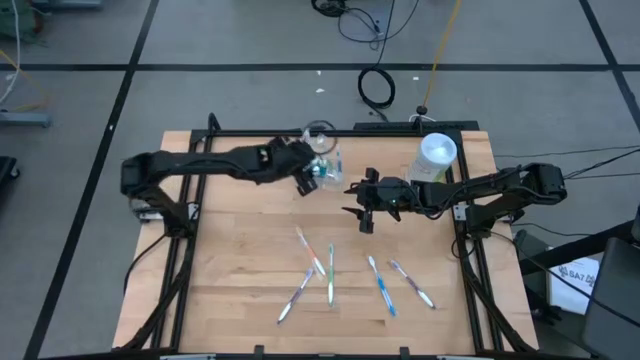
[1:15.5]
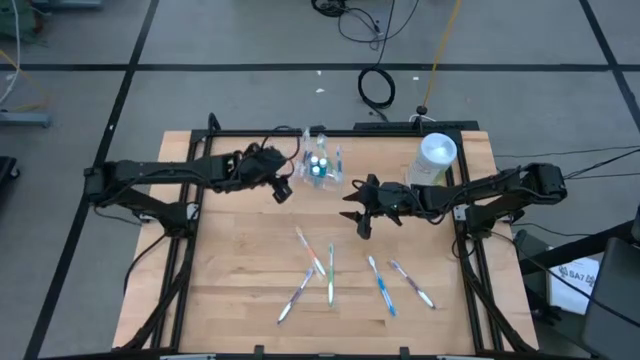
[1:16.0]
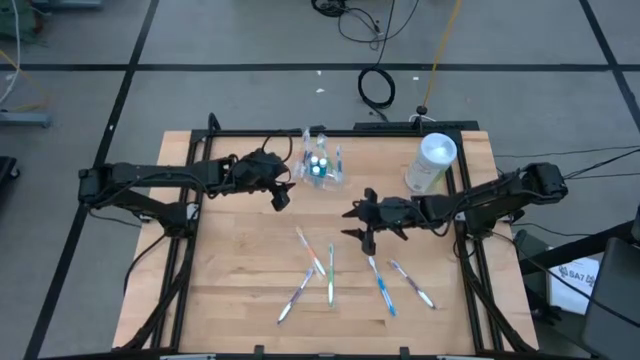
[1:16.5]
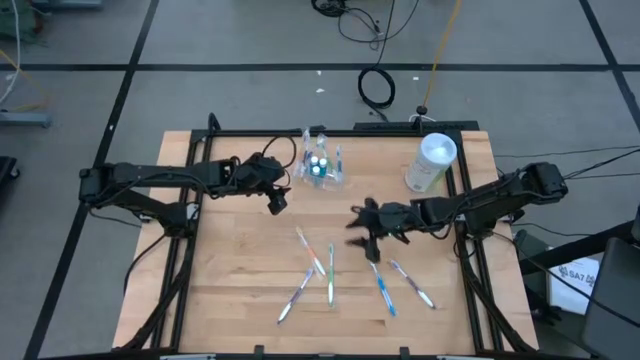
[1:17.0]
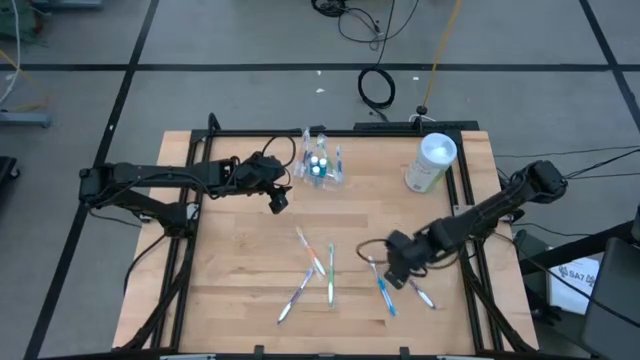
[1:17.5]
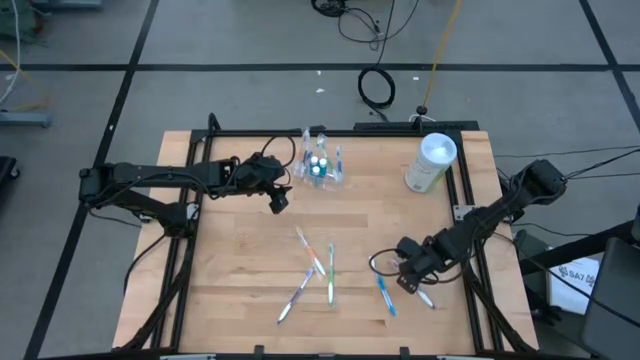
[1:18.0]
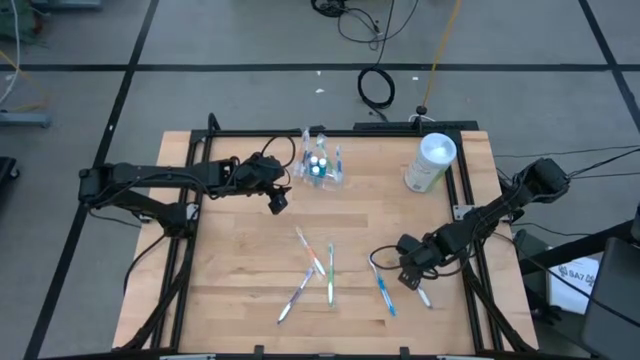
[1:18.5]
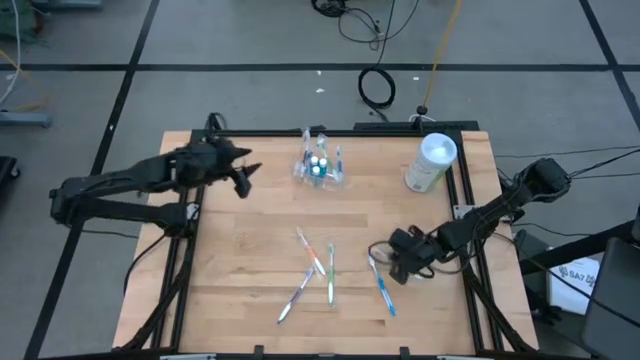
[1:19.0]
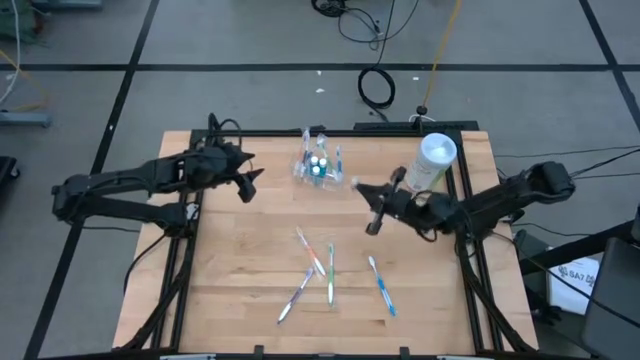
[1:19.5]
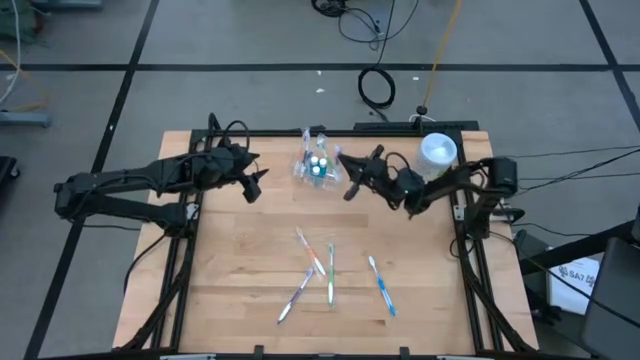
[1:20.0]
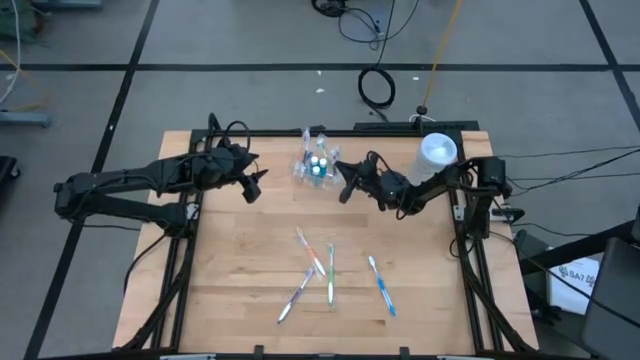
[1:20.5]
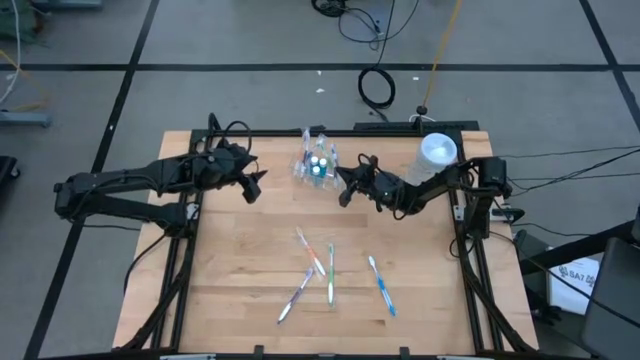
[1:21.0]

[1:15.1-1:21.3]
Task: Pick & Place toothbrushing station
Put the right violet toothbrush into the transparent organizer

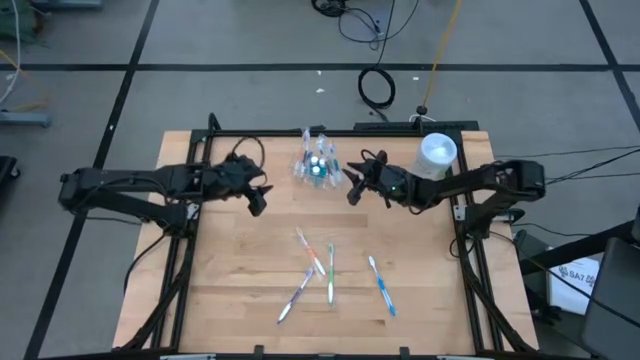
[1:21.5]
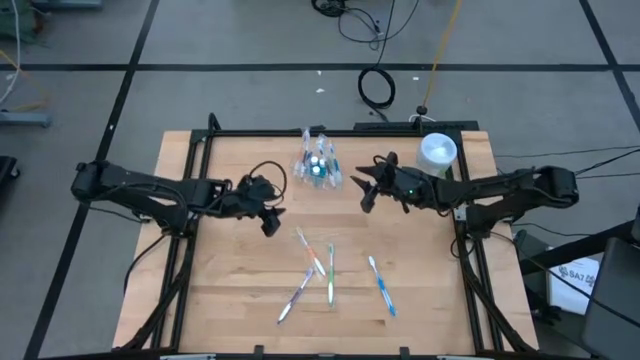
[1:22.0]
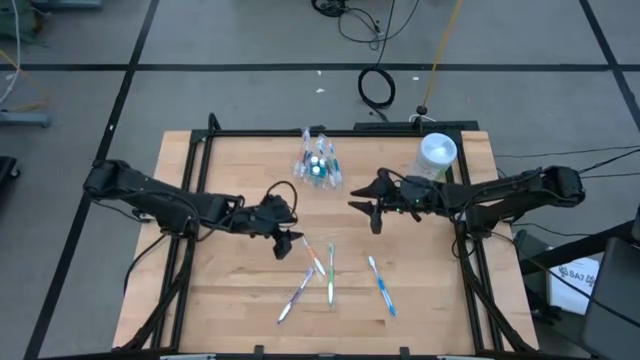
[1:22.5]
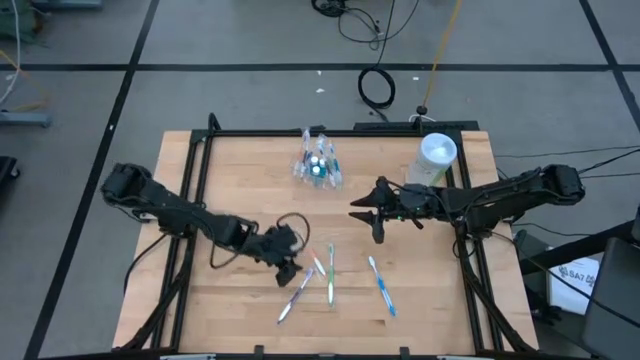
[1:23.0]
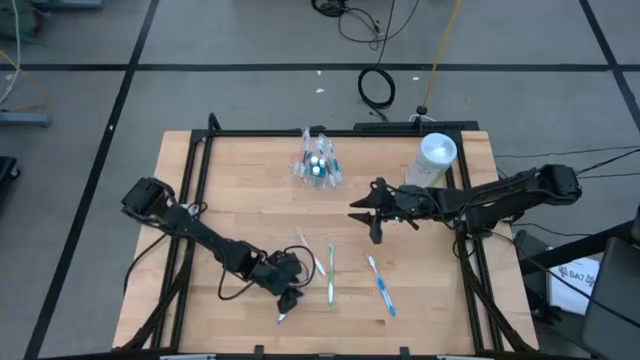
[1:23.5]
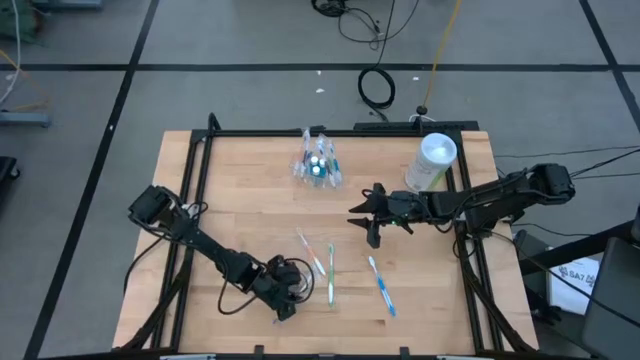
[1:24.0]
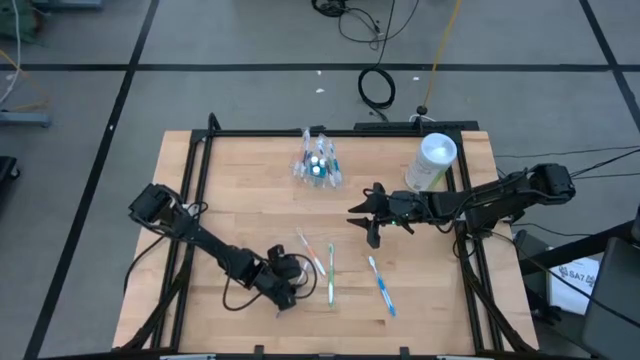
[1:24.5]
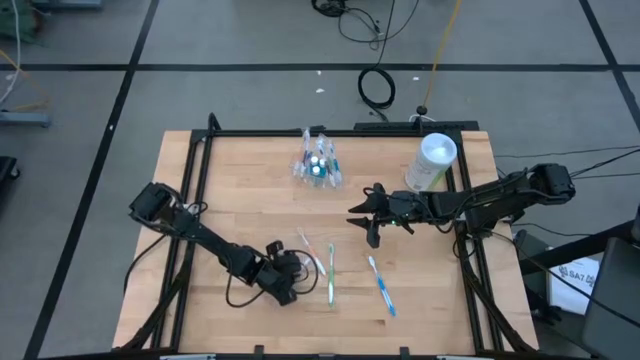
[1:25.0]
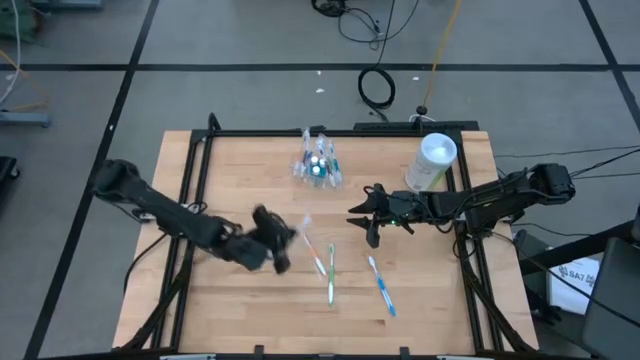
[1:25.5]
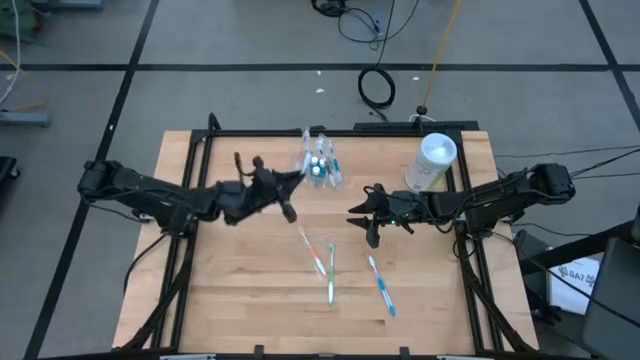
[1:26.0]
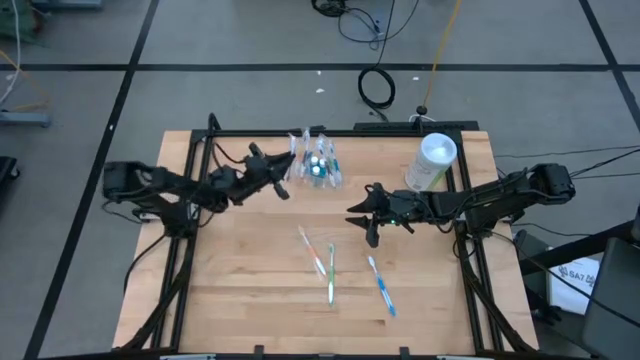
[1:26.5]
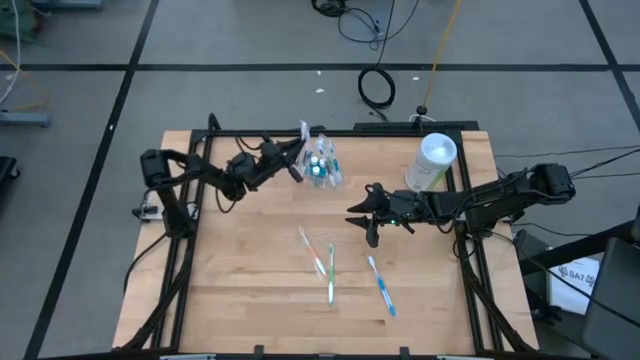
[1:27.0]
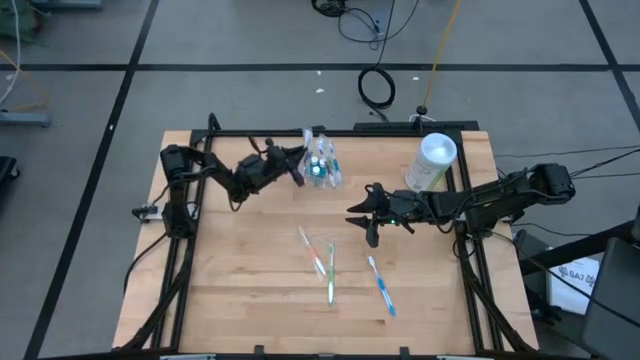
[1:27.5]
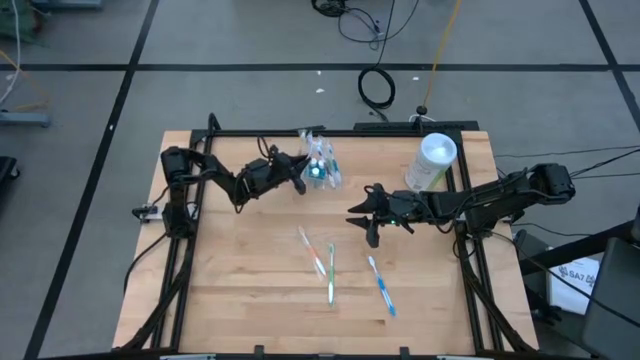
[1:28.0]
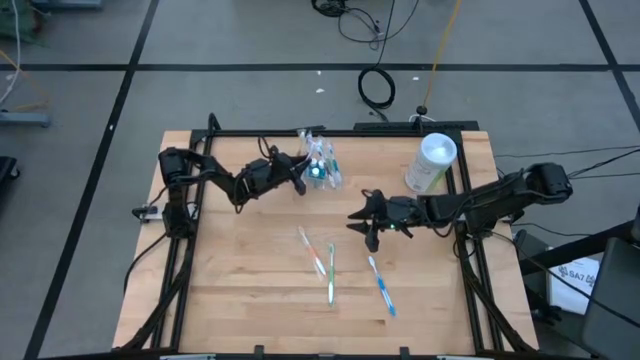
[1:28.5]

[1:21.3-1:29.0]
Put the violet toothbrush into the transparent organizer

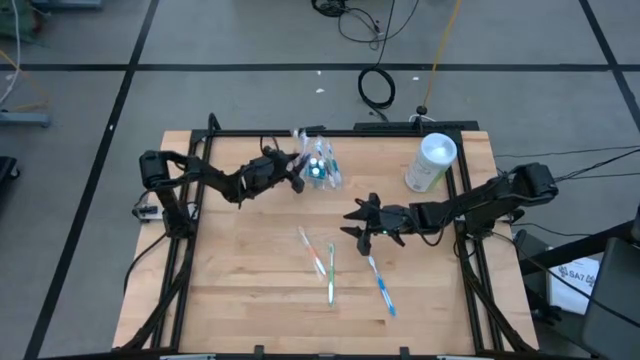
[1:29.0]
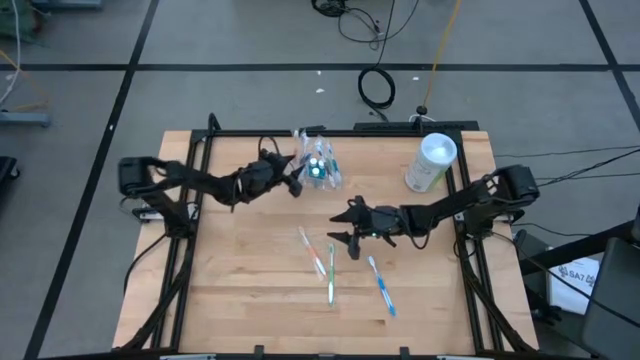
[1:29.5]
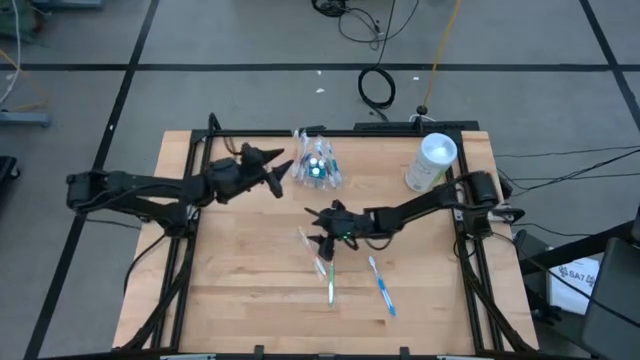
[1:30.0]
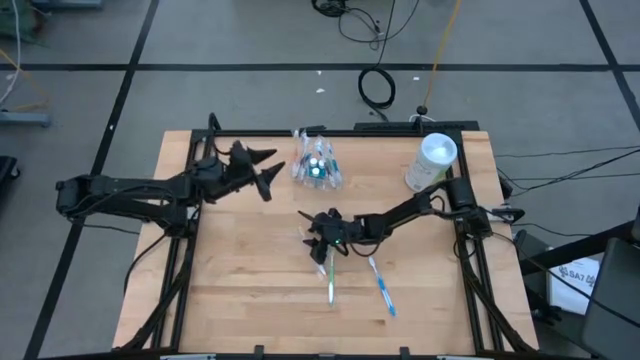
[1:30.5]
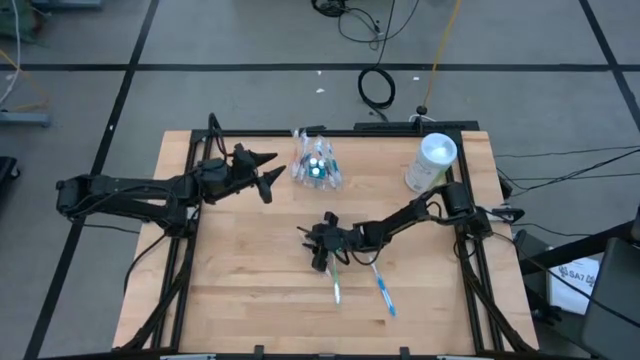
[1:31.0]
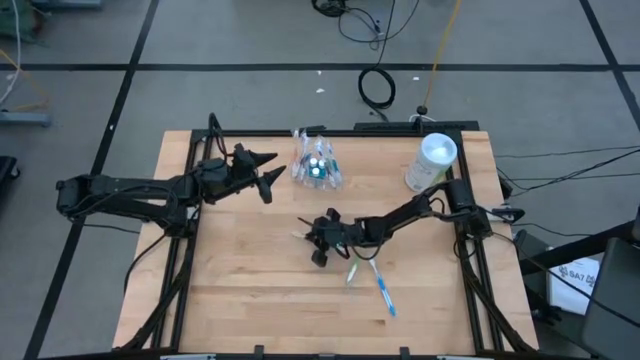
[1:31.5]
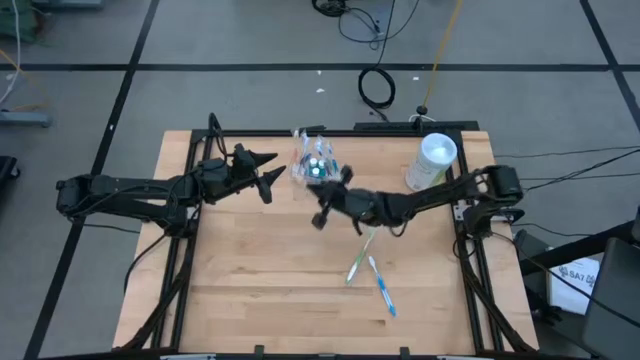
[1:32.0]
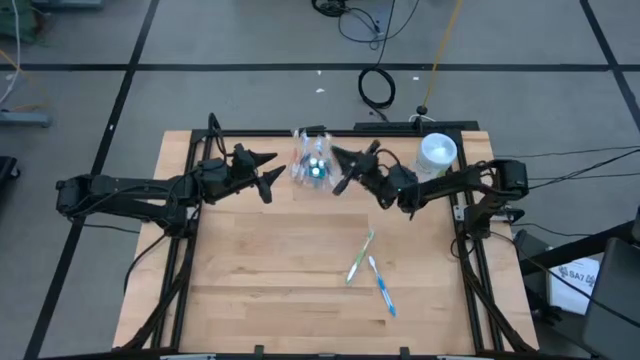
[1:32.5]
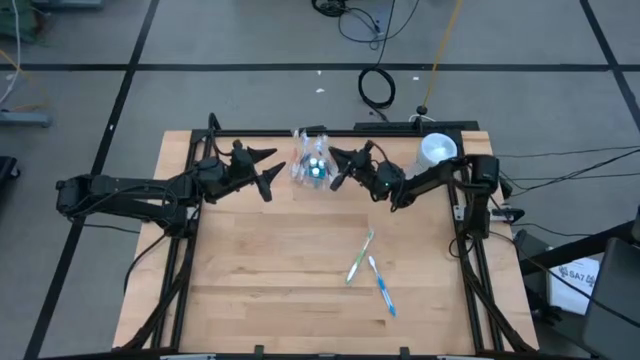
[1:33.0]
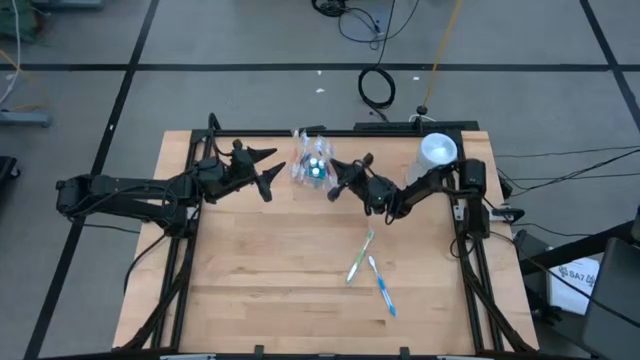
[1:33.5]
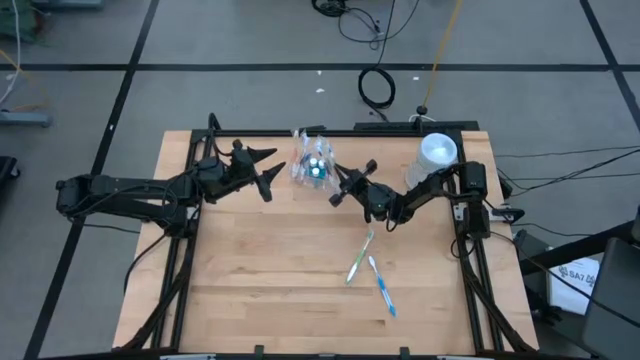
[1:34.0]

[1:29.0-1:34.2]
Put the orange toothbrush into the transparent organizer
